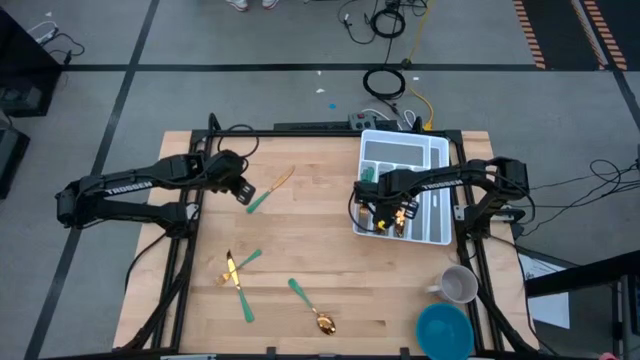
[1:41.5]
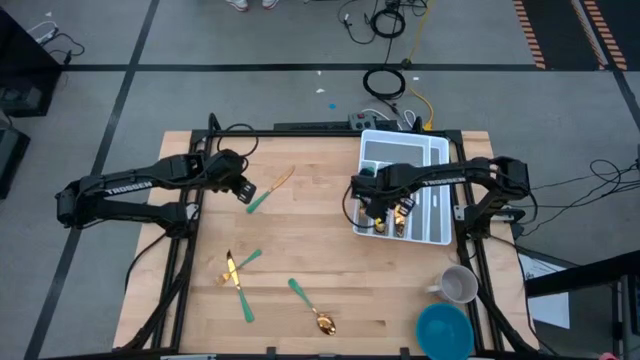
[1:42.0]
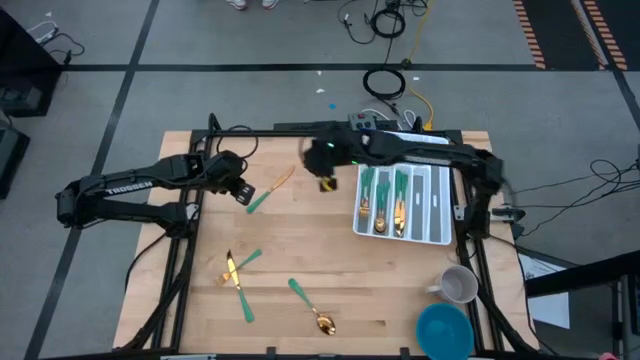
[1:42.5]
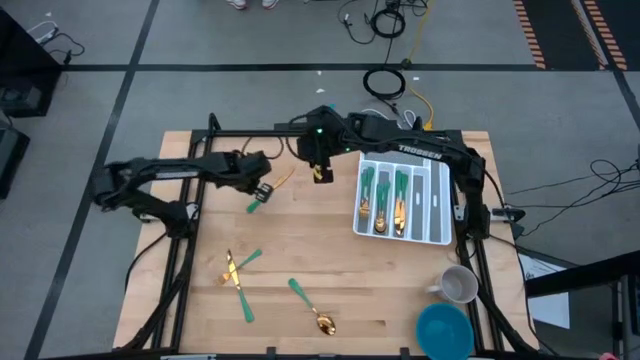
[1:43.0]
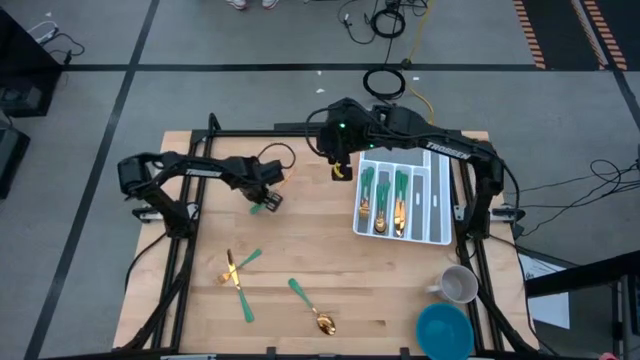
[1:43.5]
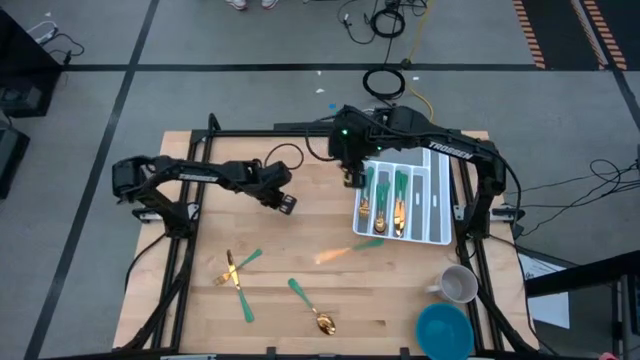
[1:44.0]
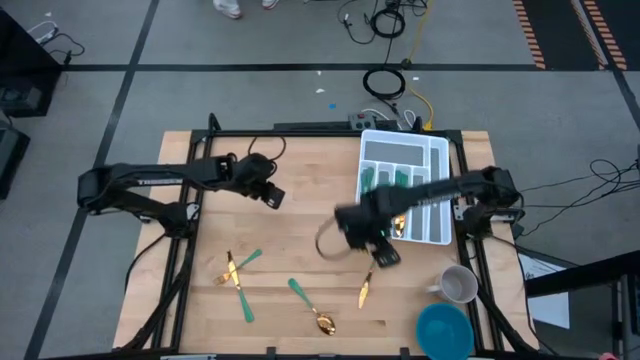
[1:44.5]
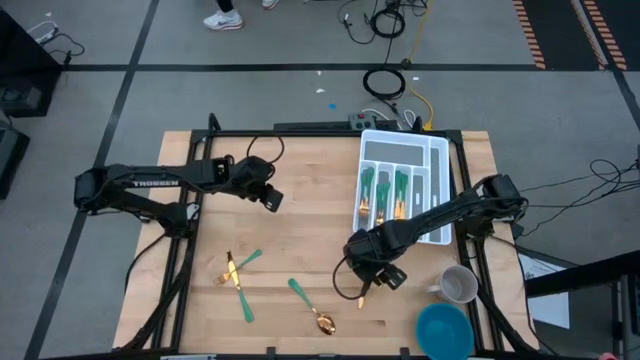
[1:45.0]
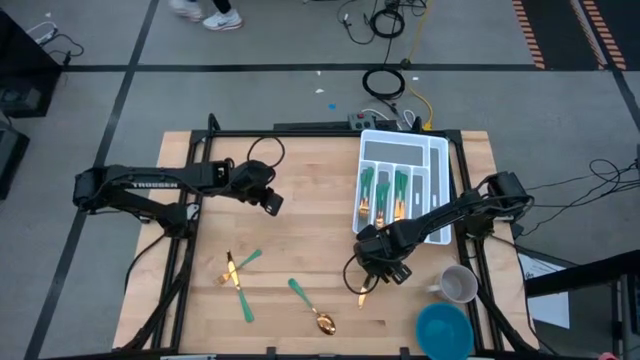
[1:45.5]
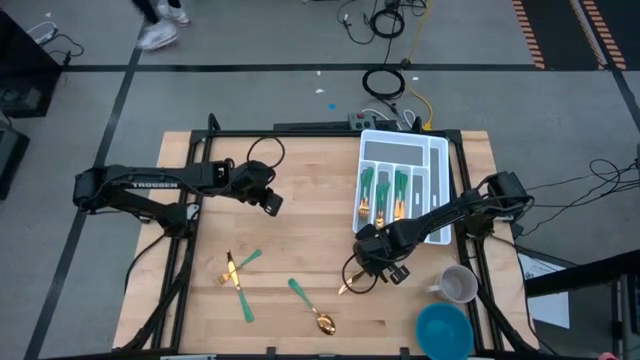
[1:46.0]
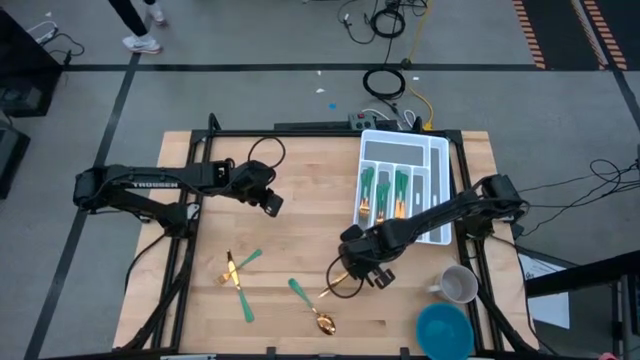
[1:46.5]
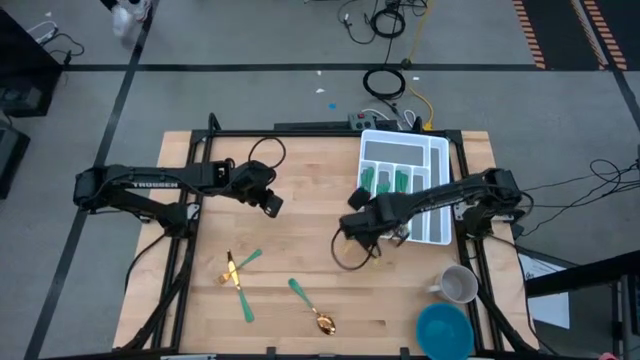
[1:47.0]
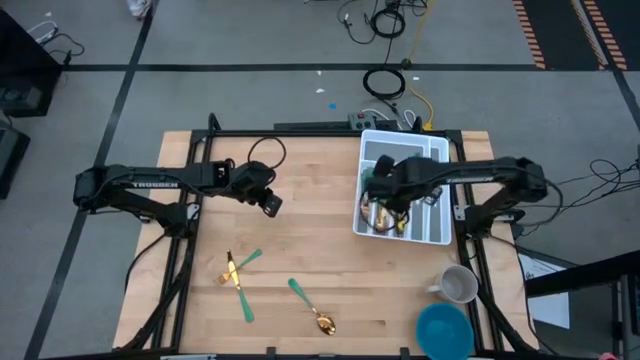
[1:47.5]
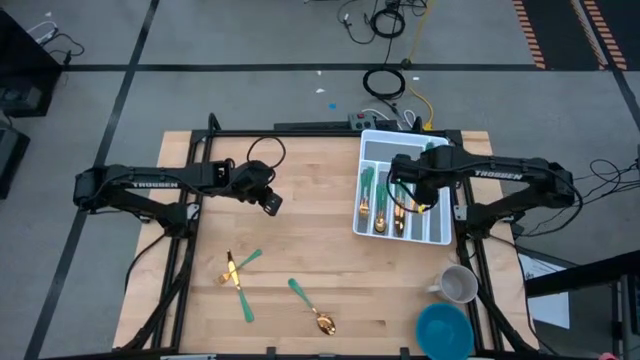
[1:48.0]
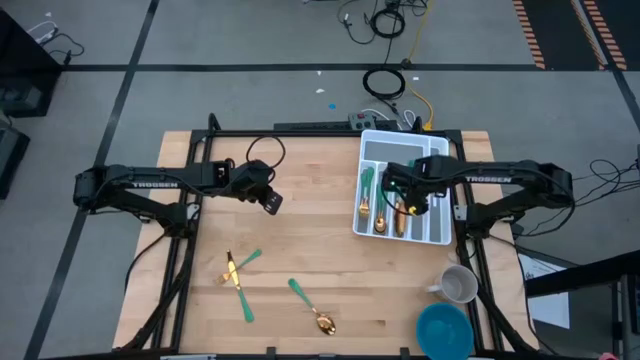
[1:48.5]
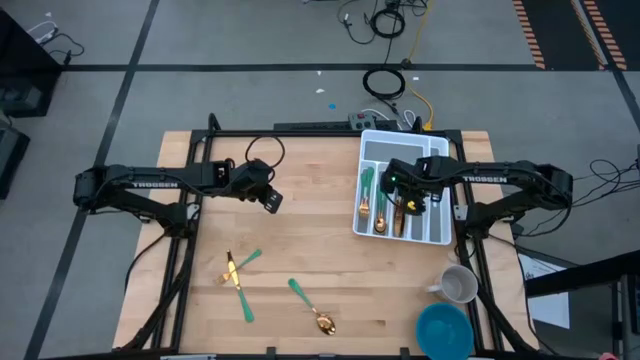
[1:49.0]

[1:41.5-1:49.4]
Task: Sort silverware
Put the knife into the silverware tray

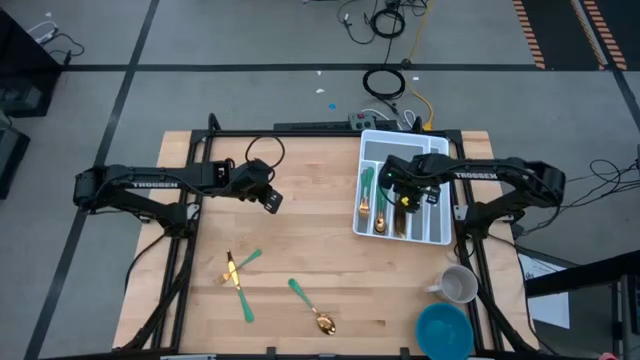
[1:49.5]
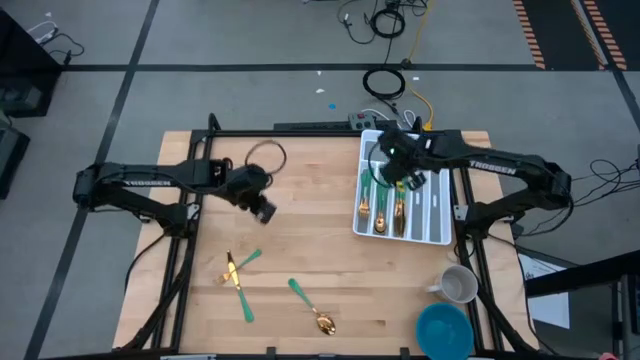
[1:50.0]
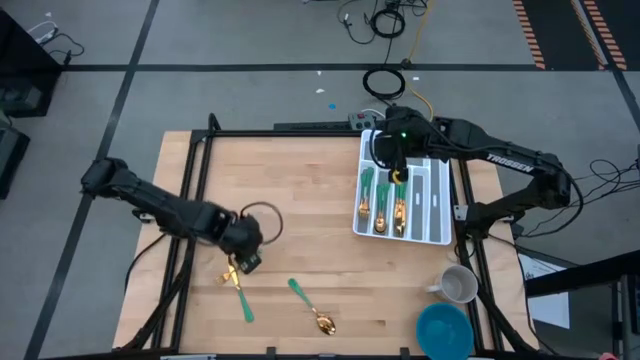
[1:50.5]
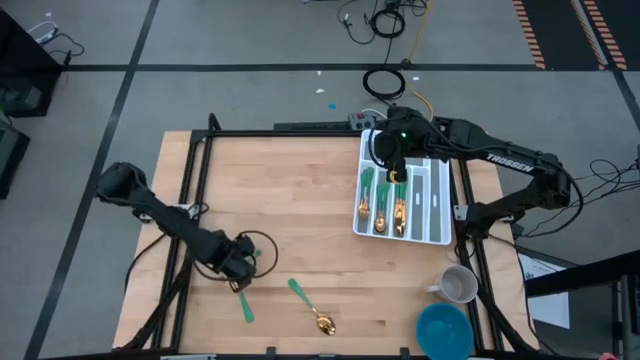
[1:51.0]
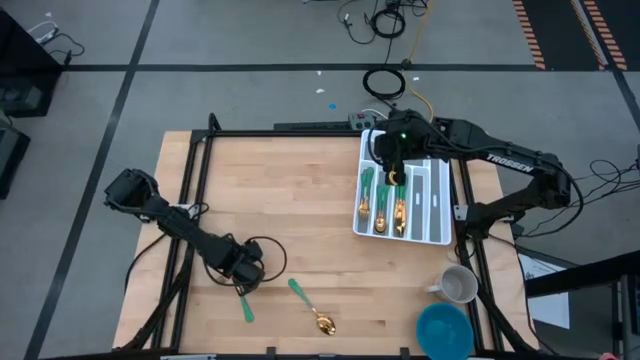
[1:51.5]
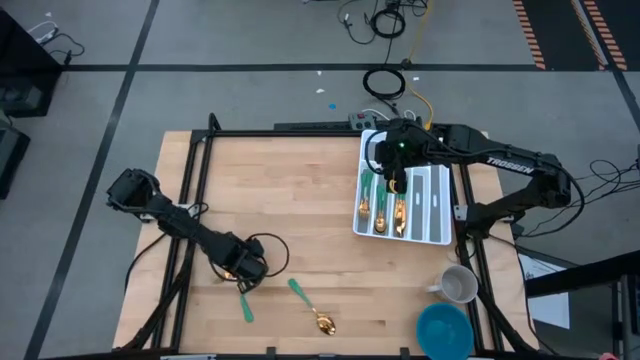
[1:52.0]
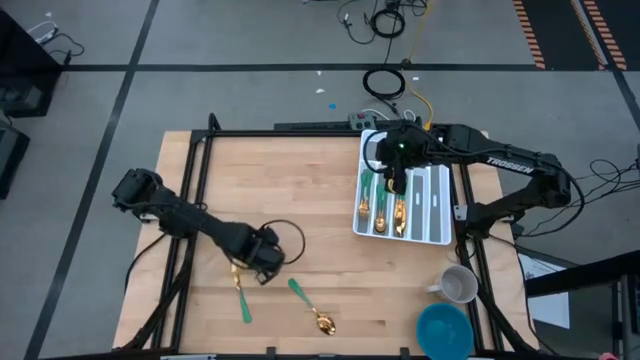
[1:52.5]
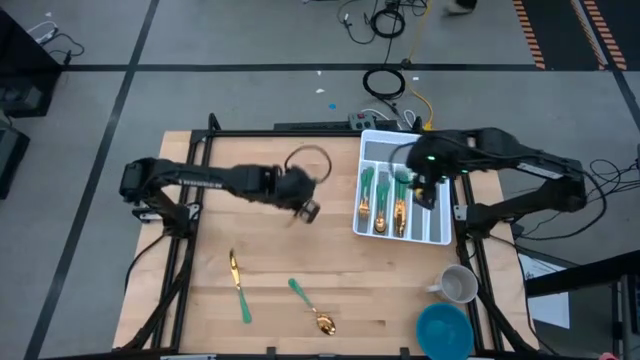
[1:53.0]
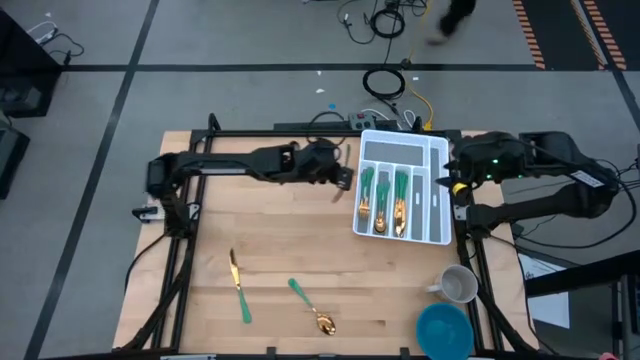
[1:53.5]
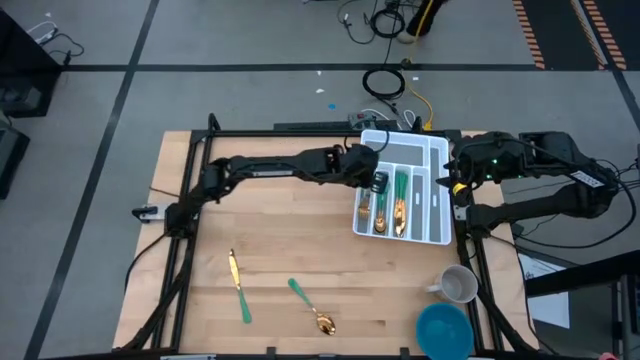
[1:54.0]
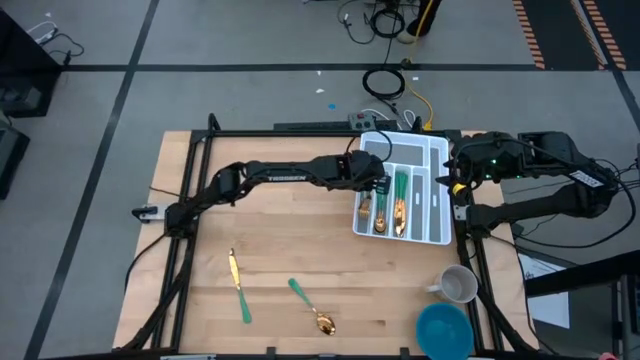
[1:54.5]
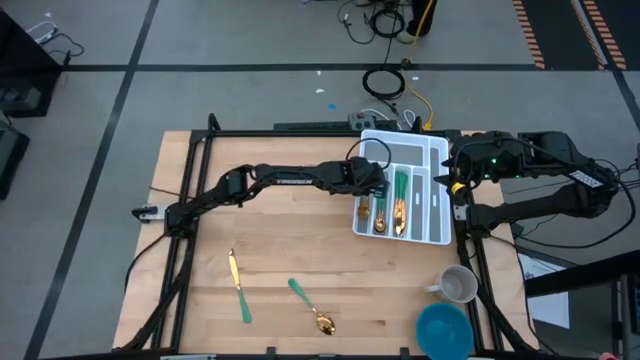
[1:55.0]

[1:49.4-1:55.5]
Put the fork into the silverware tray

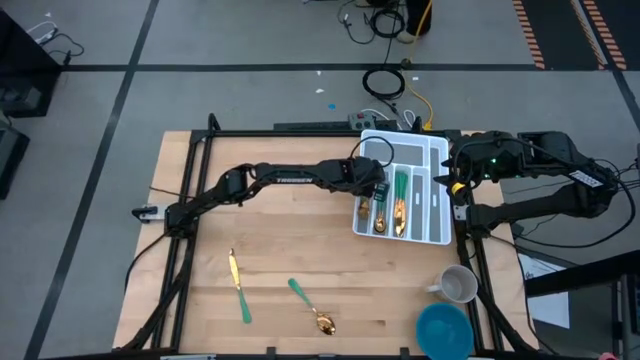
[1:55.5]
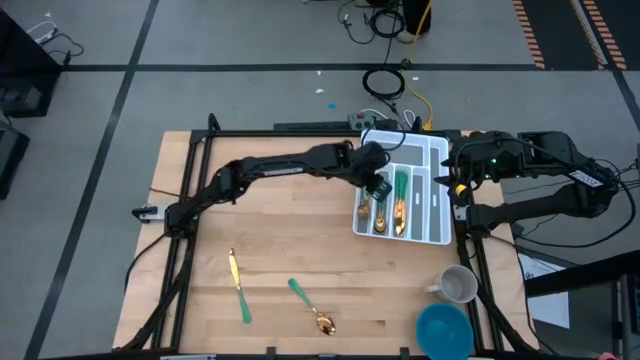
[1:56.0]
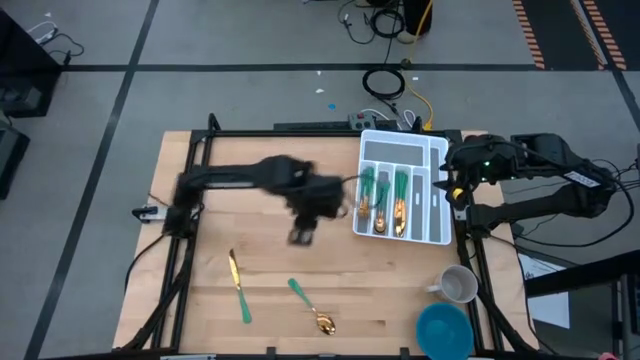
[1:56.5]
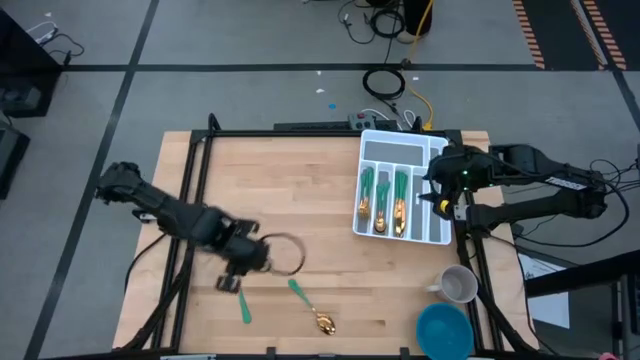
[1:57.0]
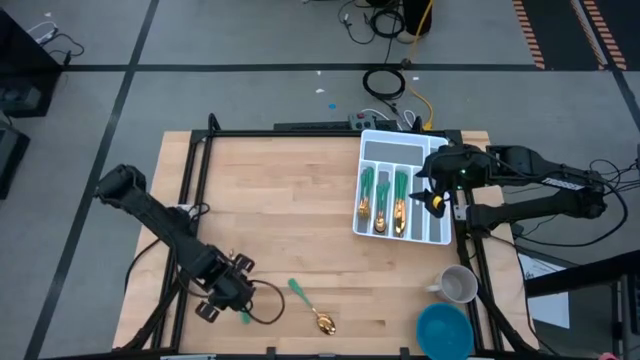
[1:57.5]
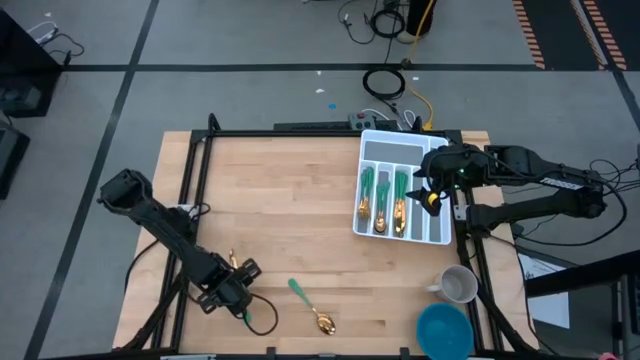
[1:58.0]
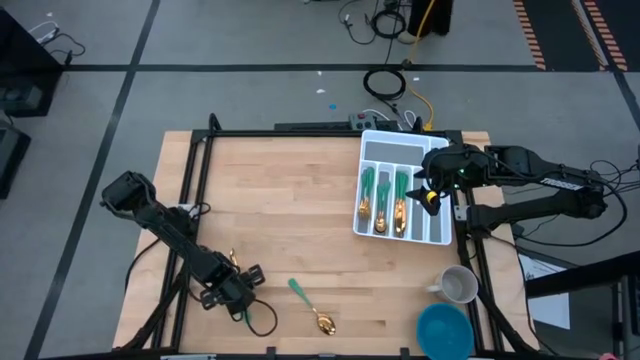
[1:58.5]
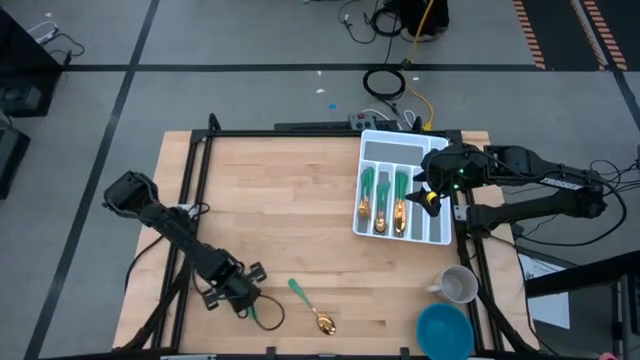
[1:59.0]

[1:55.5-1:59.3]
Put the knife into the silverware tray

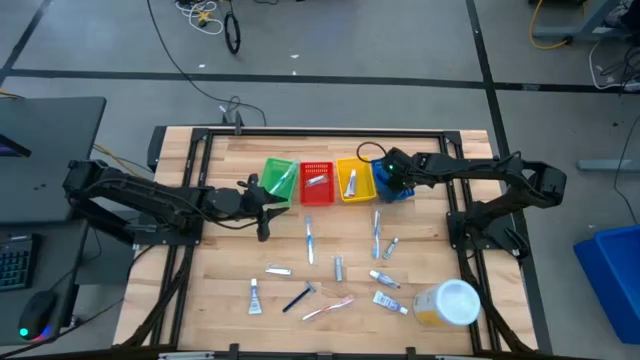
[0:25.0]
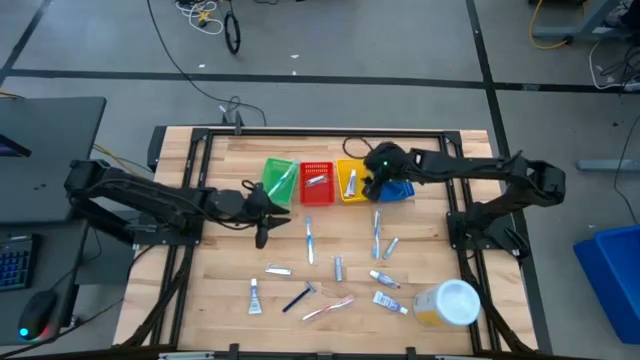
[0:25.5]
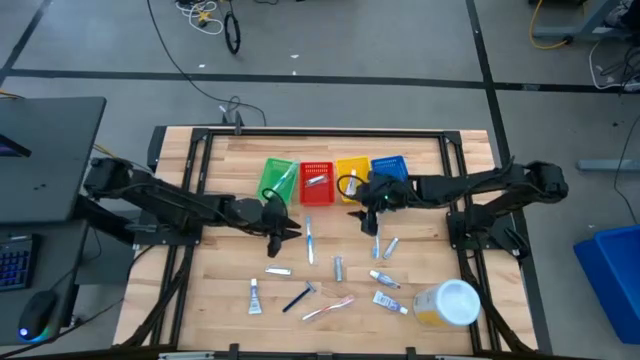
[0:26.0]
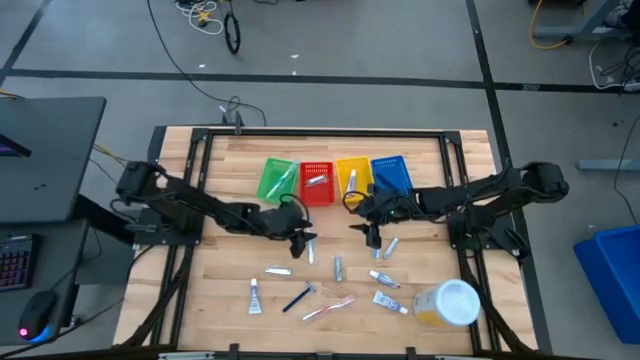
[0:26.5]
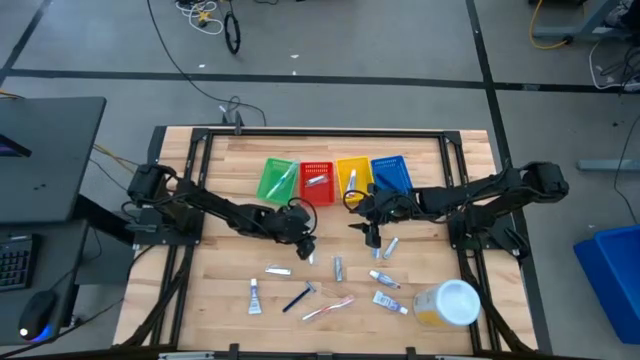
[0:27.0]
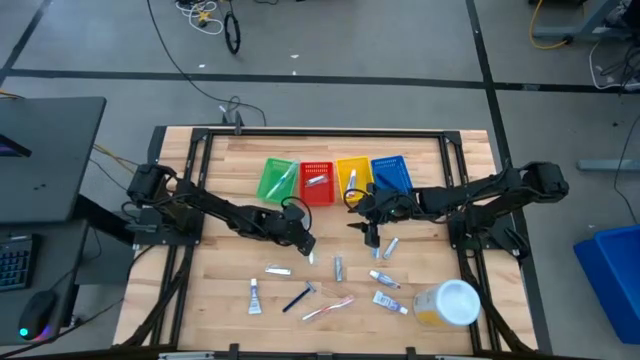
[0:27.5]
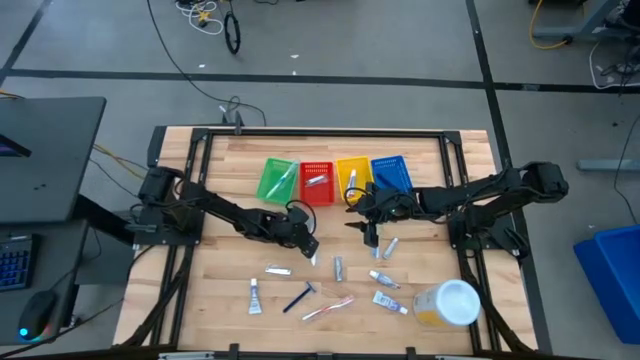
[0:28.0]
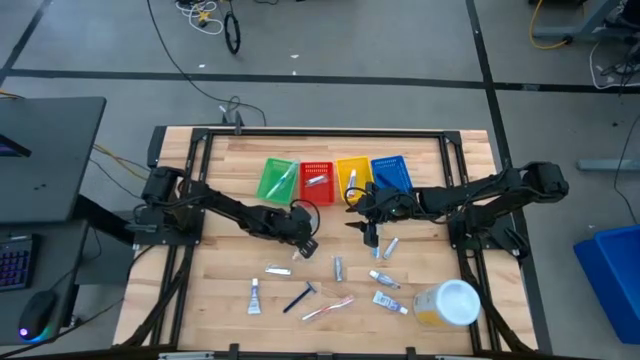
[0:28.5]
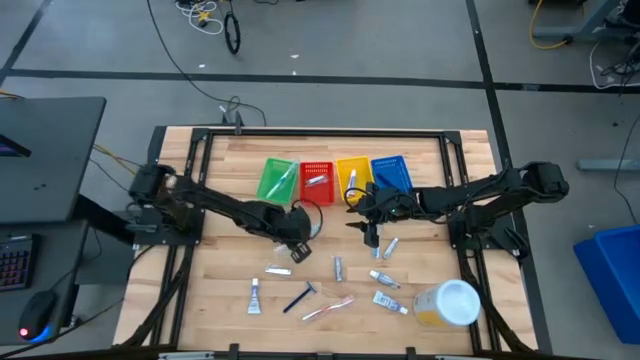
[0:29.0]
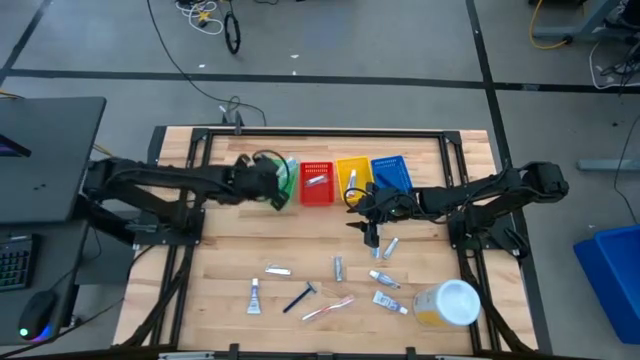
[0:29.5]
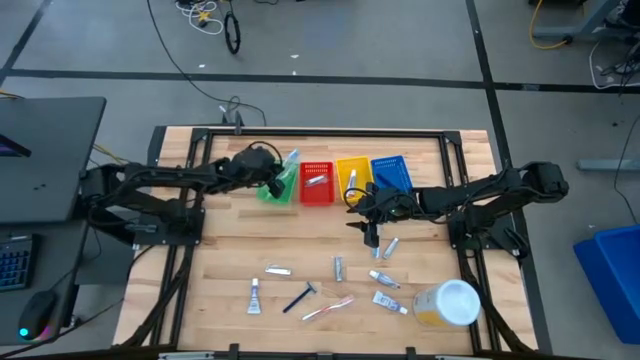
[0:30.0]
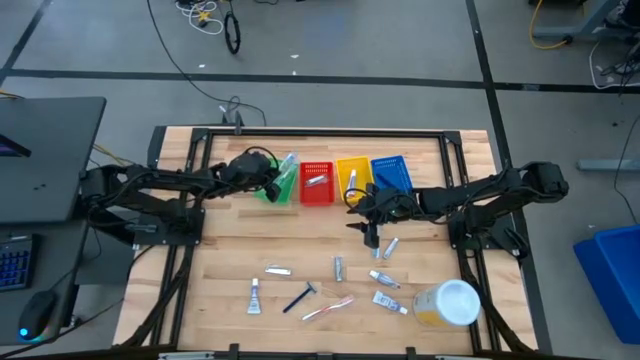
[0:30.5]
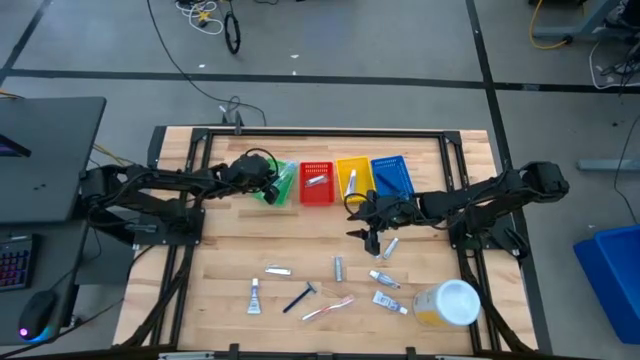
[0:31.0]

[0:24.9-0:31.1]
Task: Pick & Place Travel size toiletries
Put the light blue toothbrush into the green bin
